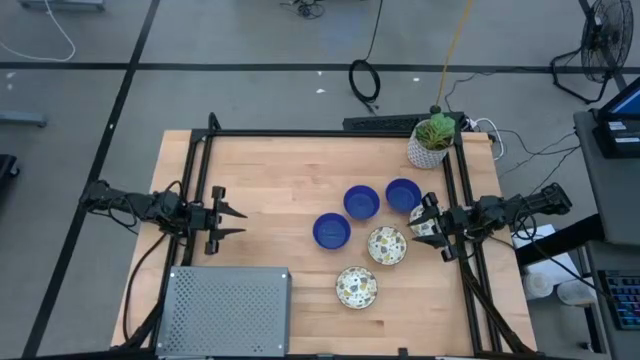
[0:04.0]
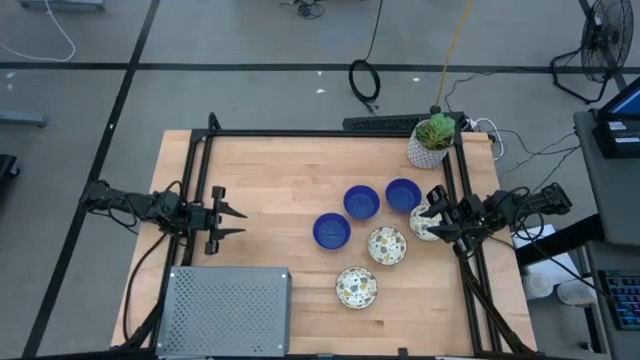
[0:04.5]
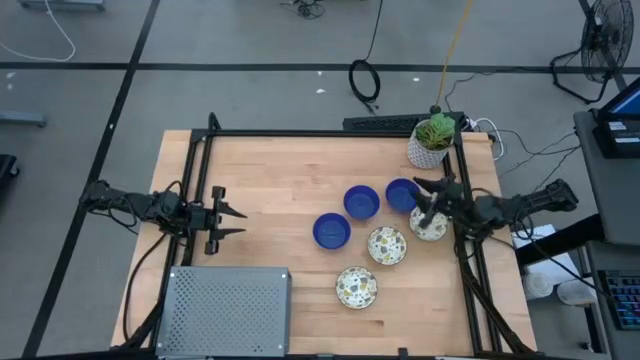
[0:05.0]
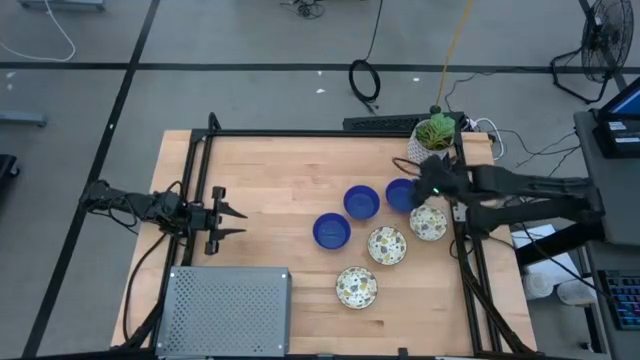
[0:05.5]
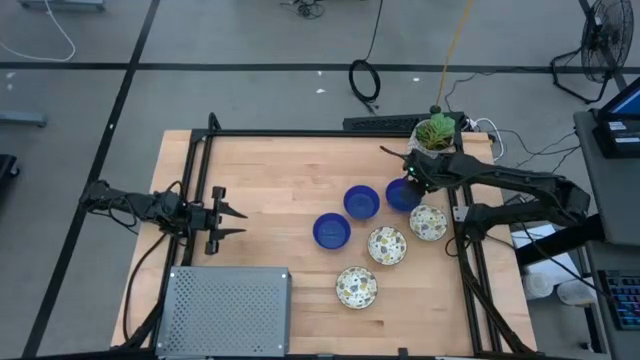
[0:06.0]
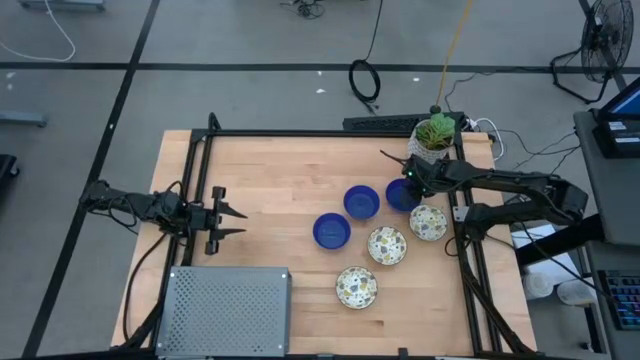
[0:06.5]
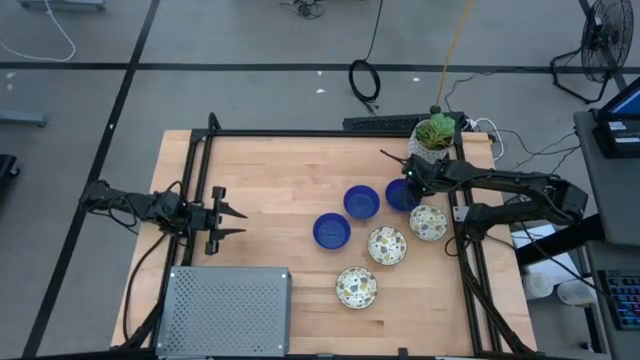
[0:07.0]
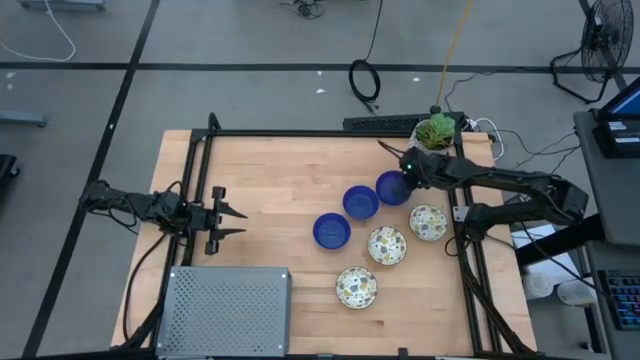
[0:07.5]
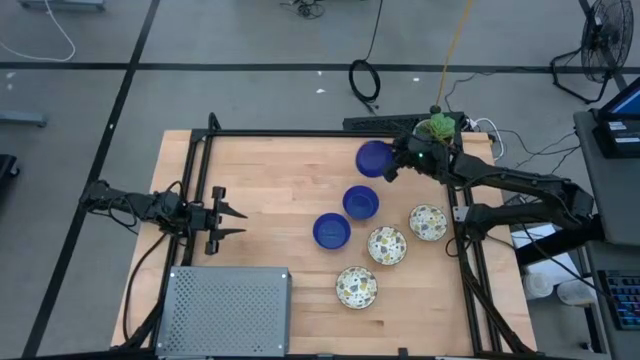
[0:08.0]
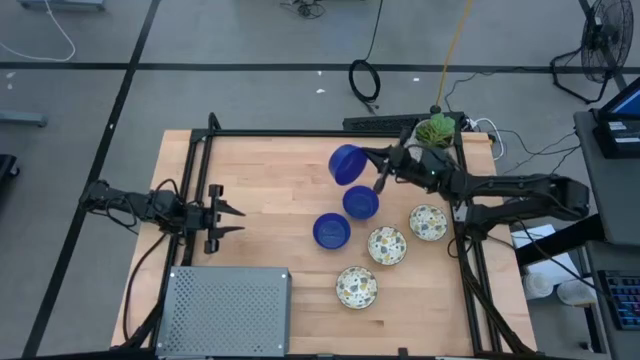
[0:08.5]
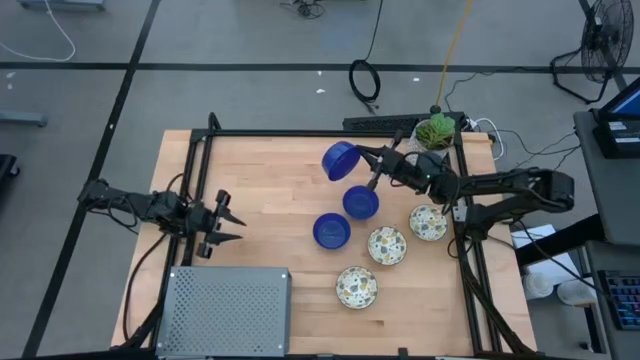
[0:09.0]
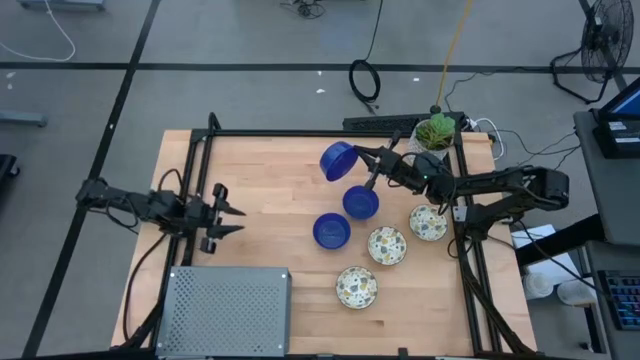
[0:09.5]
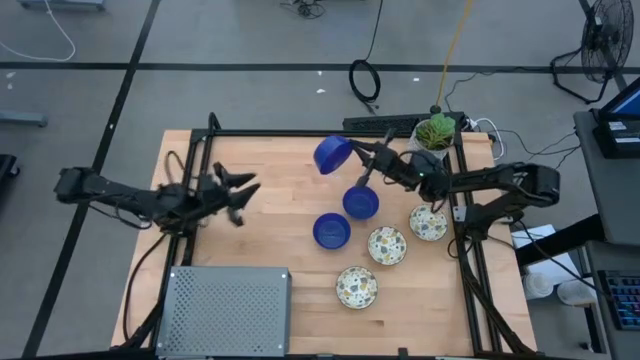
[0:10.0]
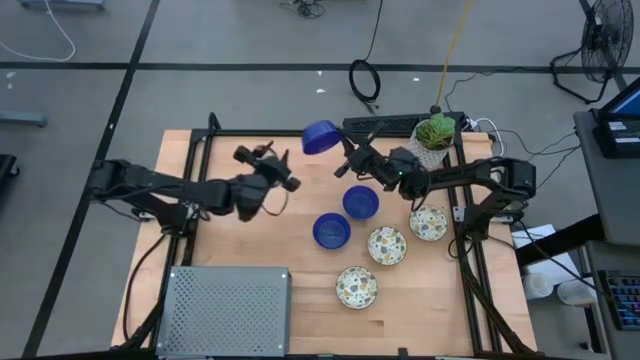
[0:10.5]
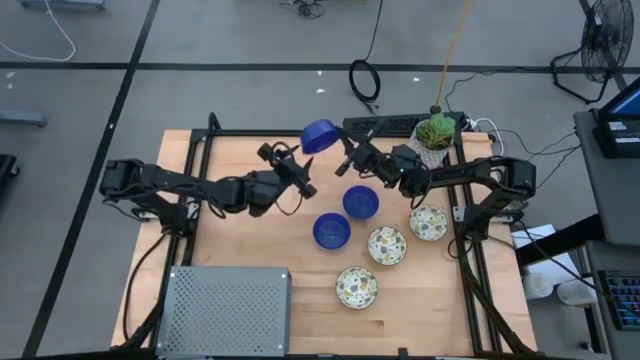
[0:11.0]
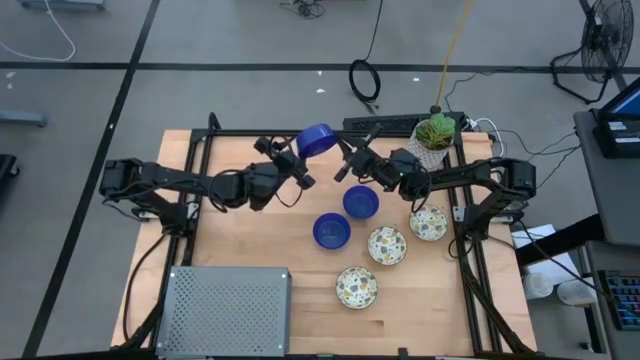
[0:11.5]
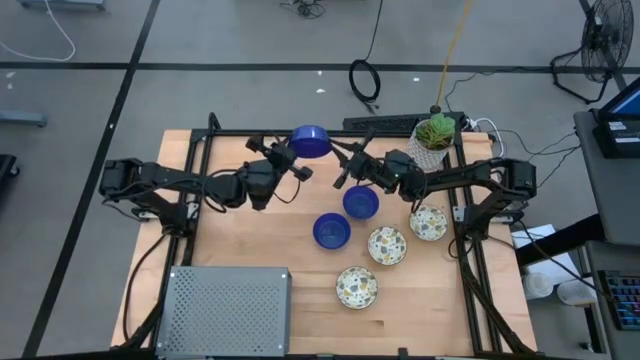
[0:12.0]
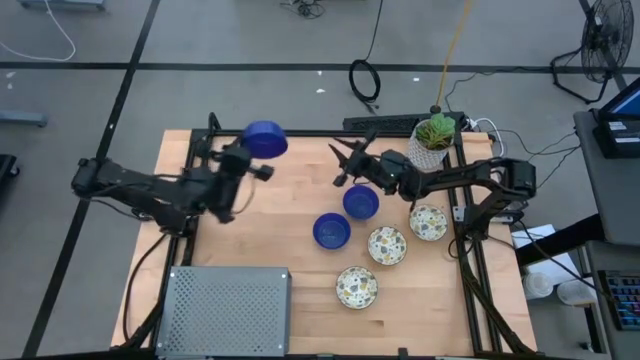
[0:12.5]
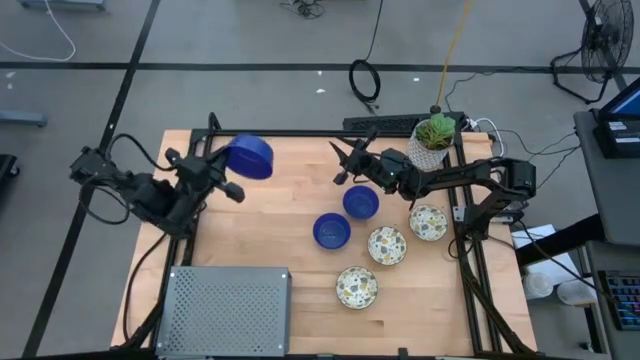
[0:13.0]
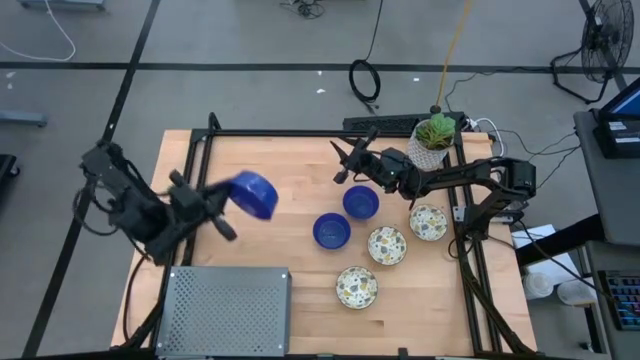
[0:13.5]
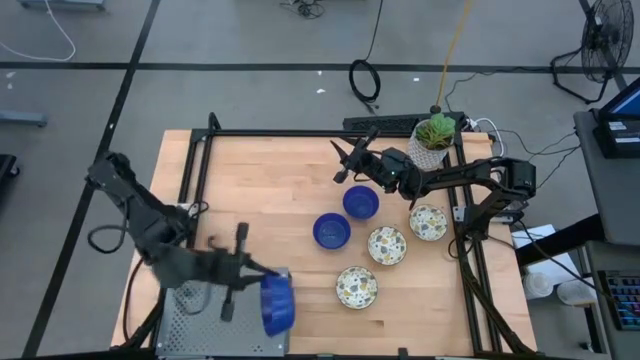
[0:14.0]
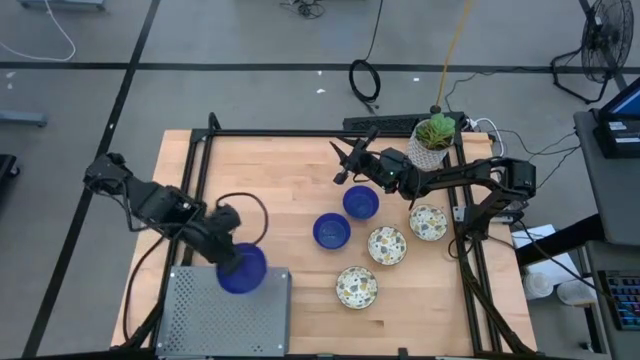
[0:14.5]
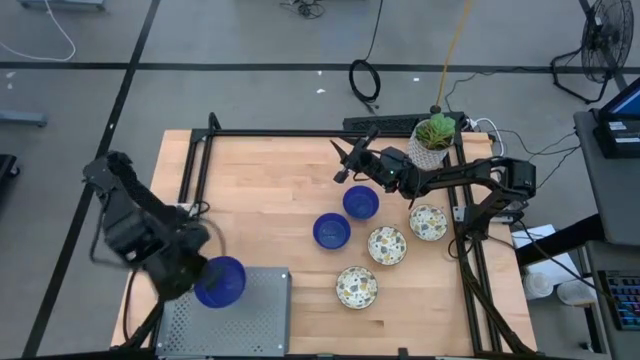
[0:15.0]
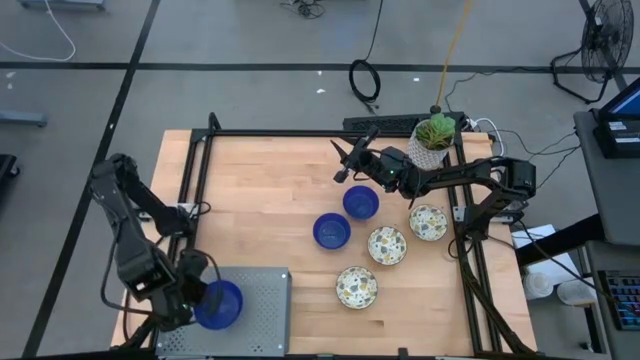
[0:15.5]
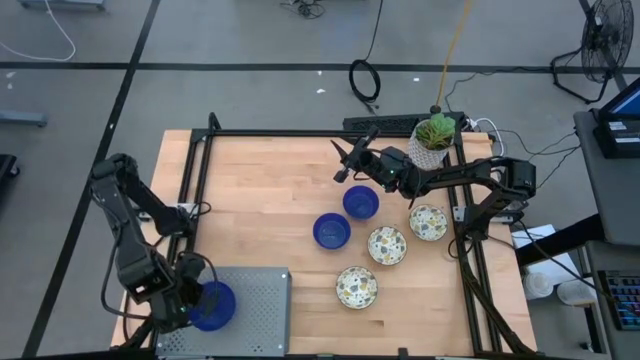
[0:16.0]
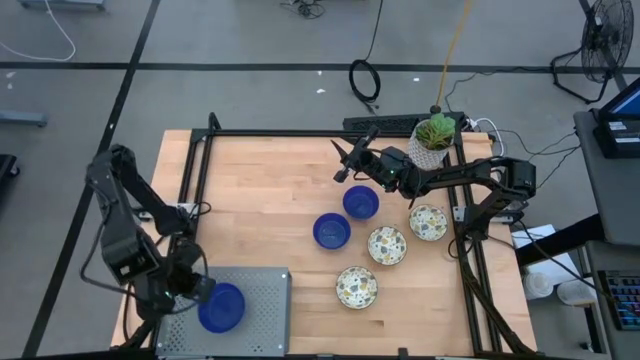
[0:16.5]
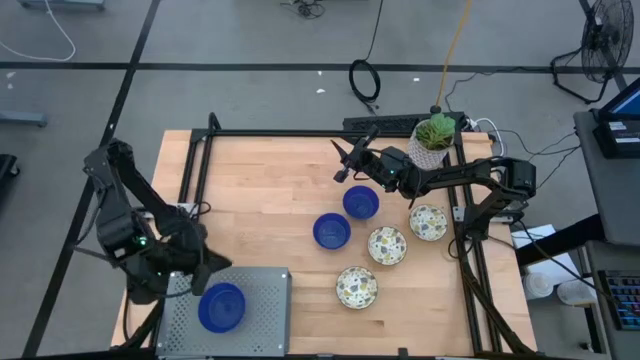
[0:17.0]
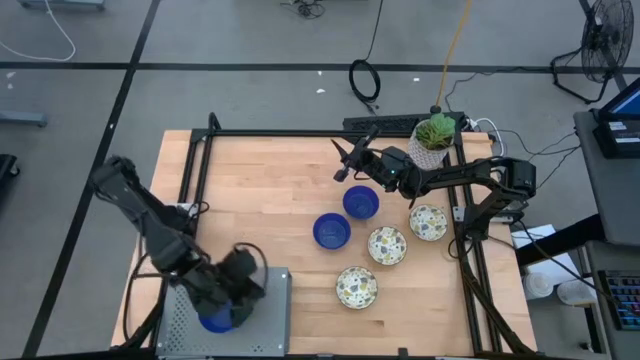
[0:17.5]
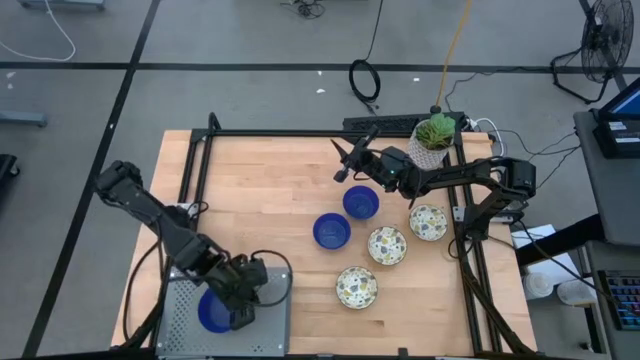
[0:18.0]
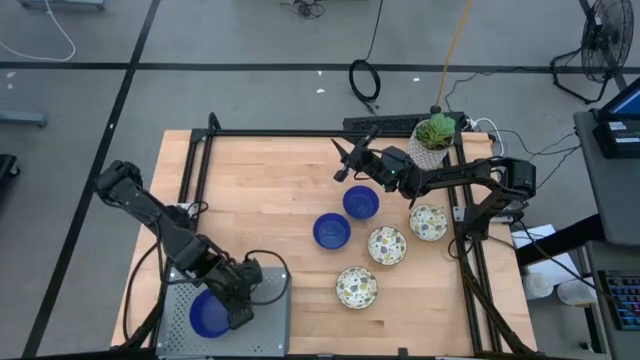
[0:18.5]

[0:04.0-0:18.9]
Task: Pick & Place Mini bowls
Put the right blue bowl on the shelf

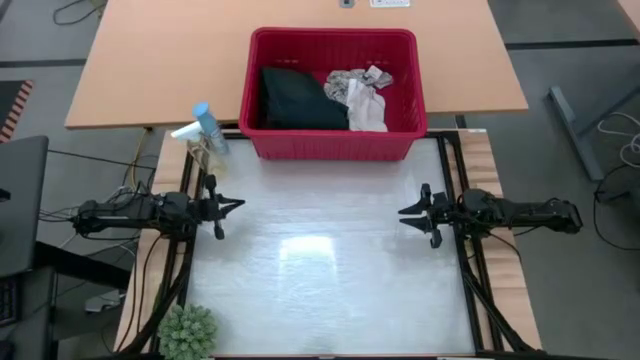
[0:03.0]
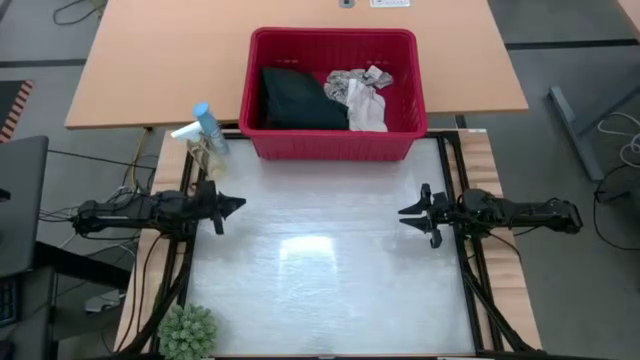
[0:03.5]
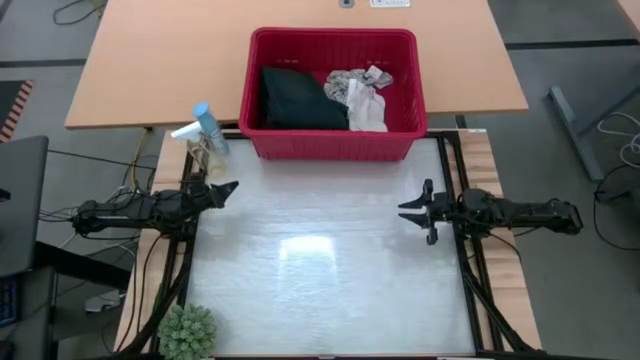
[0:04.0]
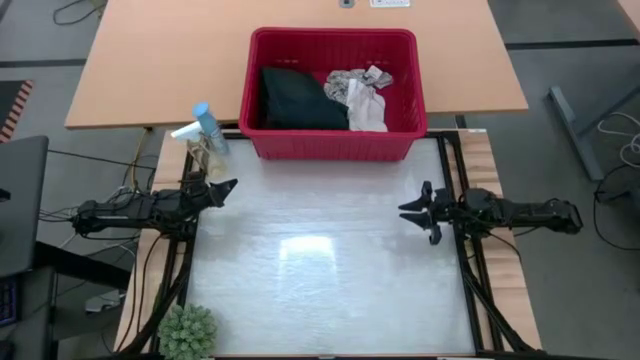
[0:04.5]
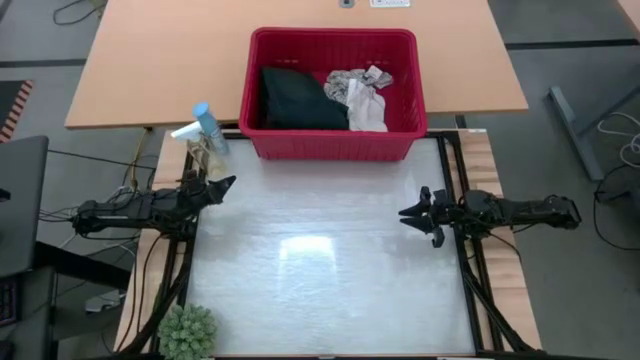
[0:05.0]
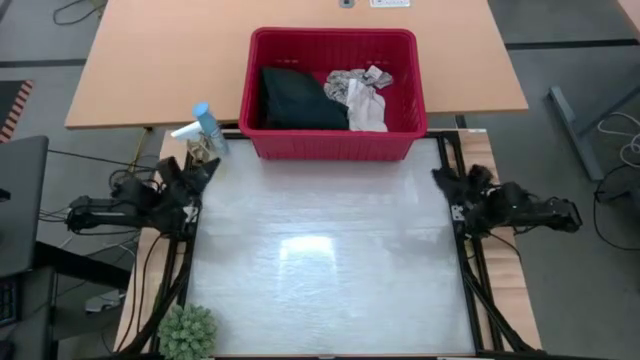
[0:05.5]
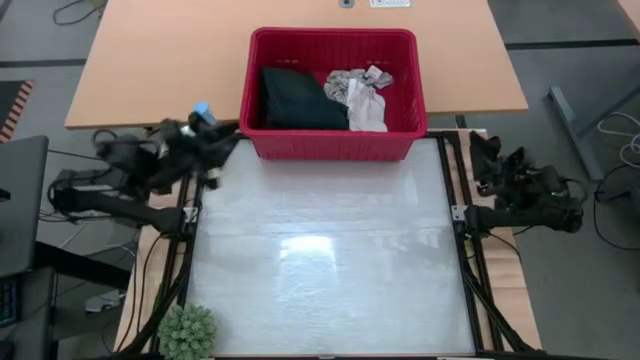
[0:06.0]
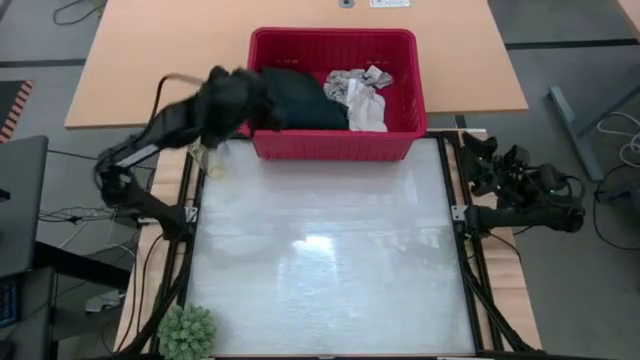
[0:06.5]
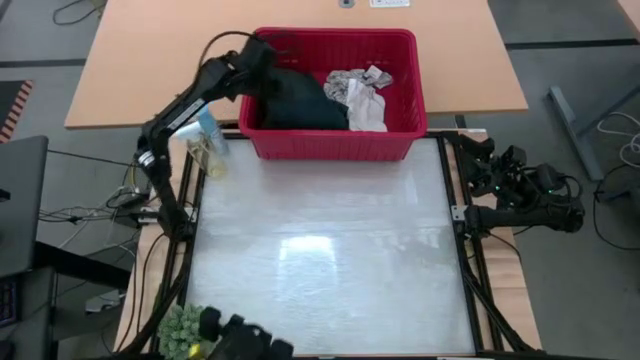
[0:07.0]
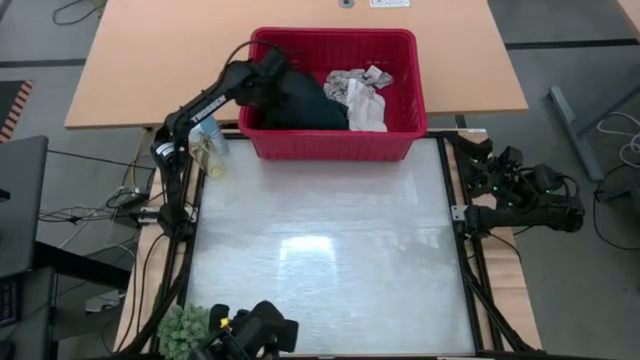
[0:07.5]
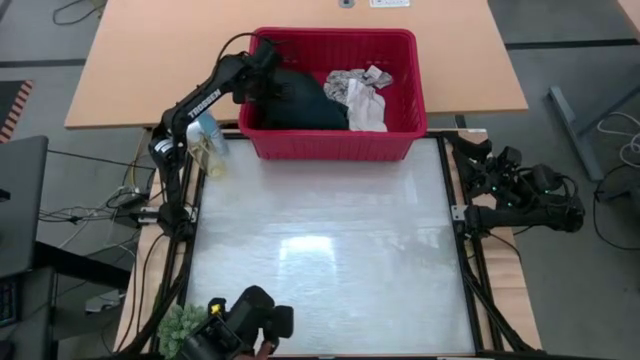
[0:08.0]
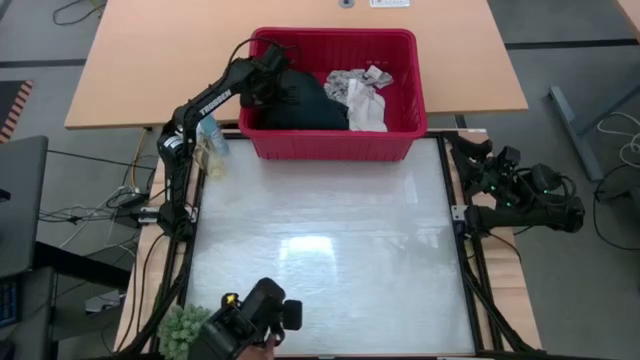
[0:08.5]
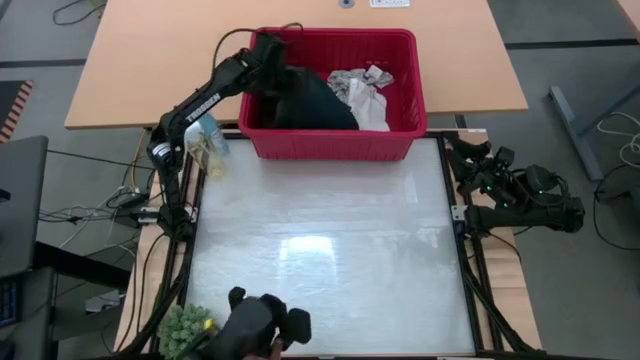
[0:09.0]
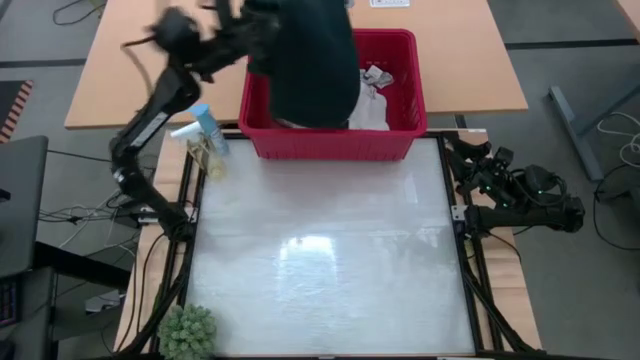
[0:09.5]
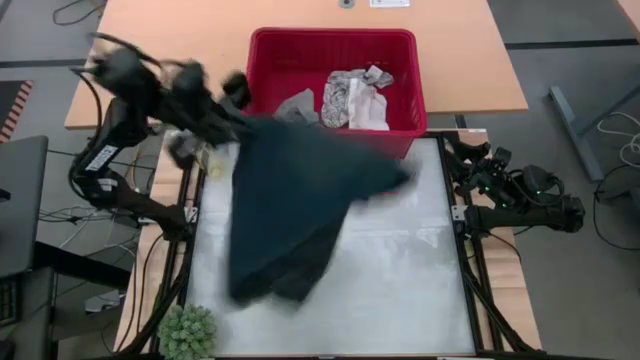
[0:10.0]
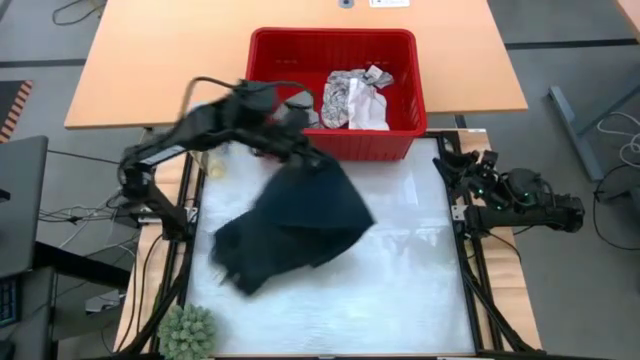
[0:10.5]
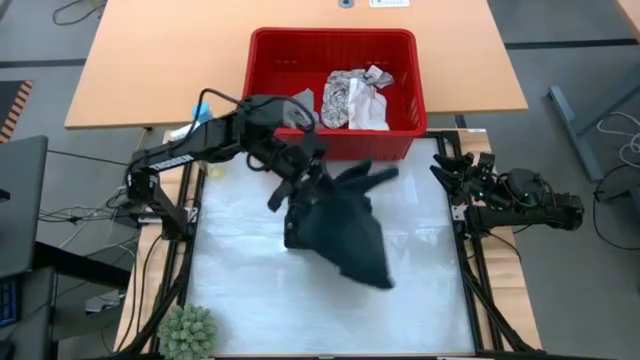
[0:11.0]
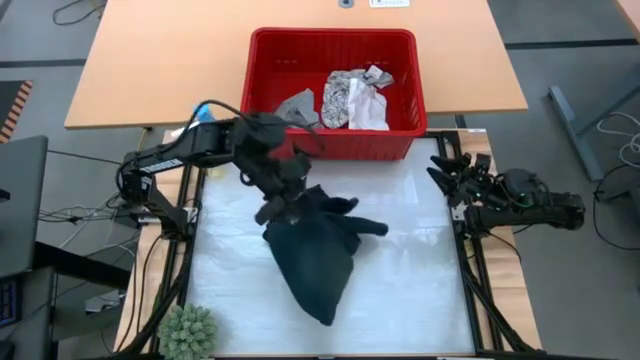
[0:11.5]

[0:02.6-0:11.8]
Task: Fold Laundry from Bin
Remove the blue pants from the red laundry bin
